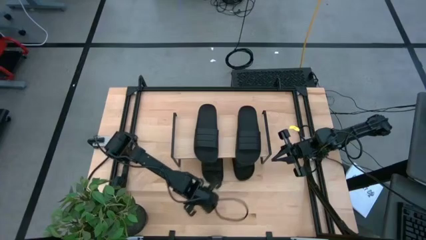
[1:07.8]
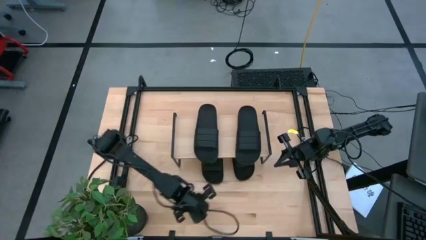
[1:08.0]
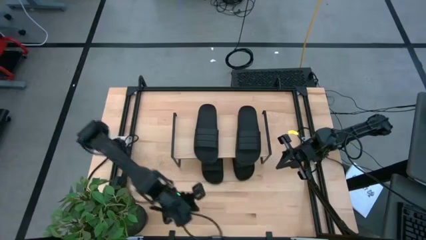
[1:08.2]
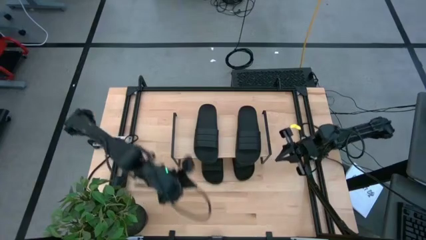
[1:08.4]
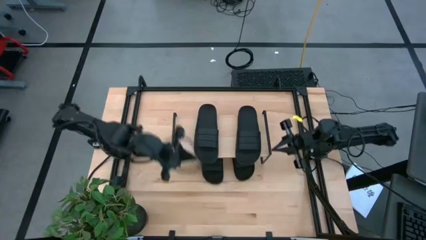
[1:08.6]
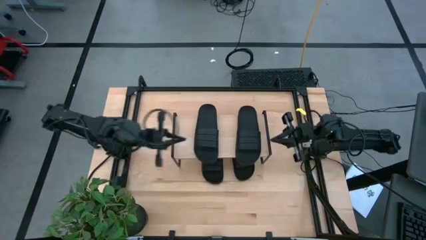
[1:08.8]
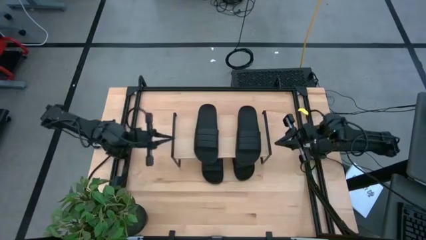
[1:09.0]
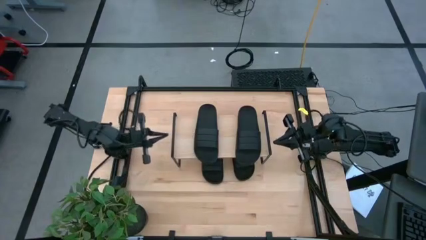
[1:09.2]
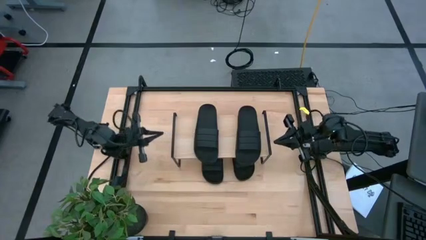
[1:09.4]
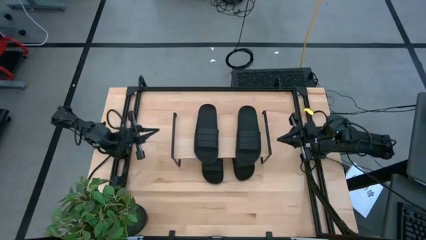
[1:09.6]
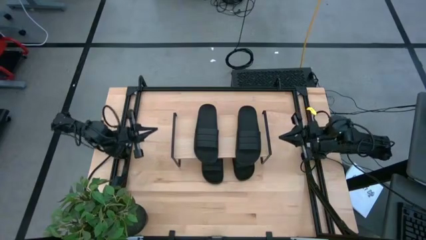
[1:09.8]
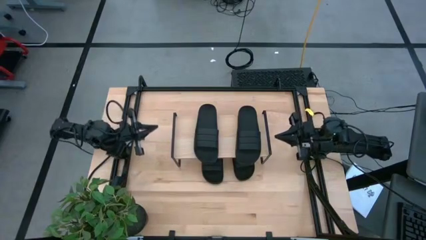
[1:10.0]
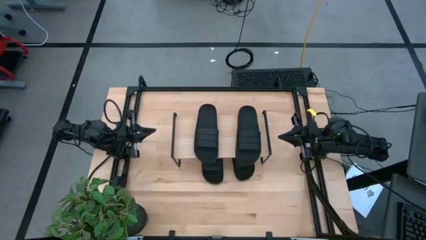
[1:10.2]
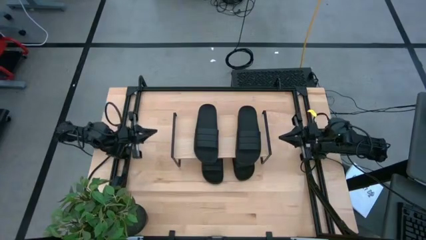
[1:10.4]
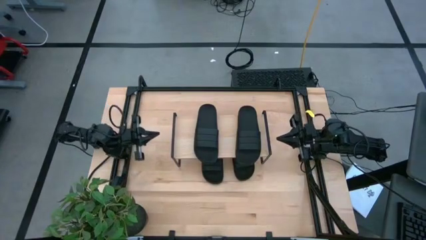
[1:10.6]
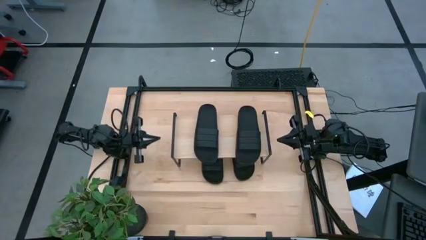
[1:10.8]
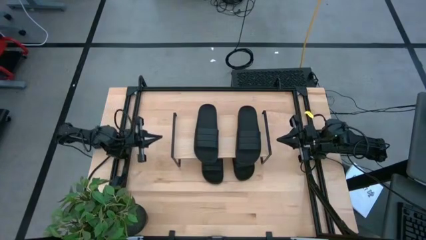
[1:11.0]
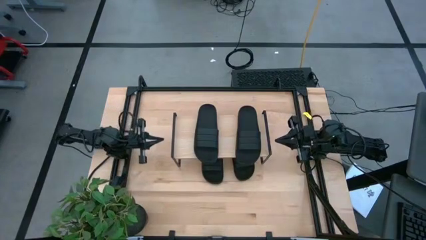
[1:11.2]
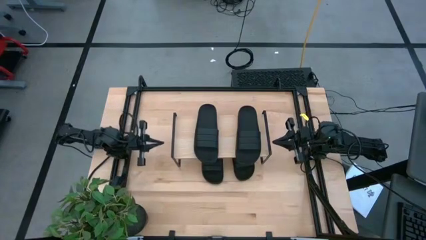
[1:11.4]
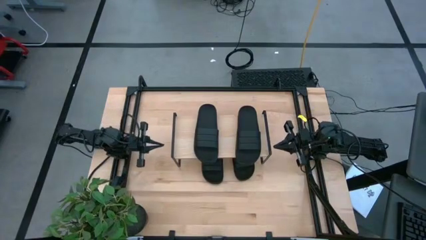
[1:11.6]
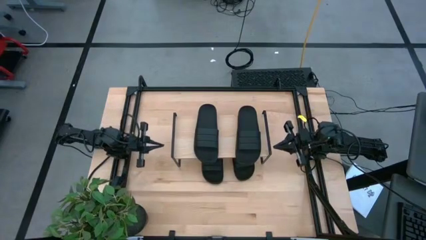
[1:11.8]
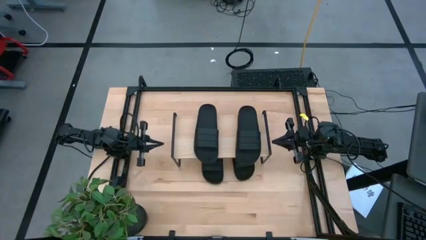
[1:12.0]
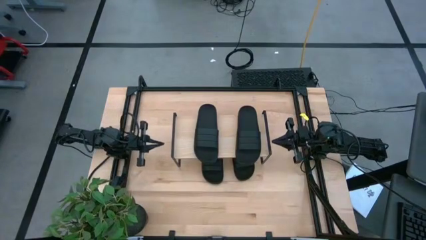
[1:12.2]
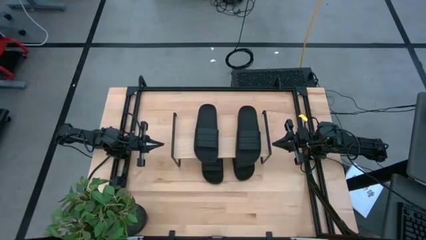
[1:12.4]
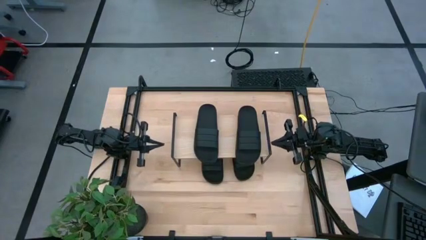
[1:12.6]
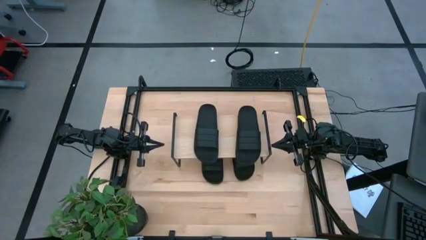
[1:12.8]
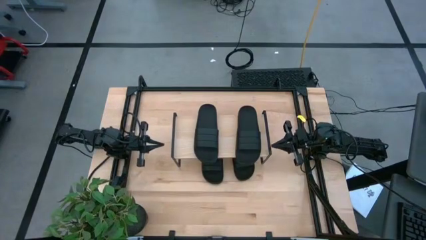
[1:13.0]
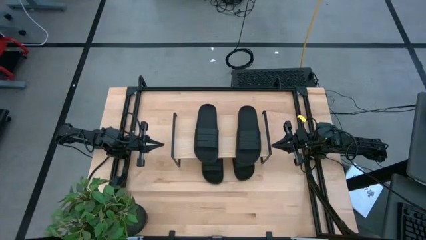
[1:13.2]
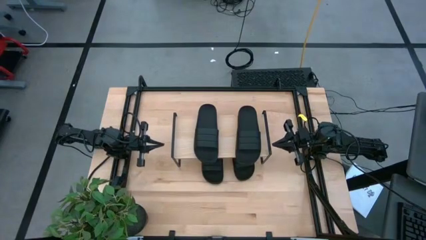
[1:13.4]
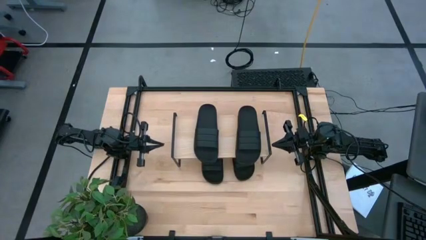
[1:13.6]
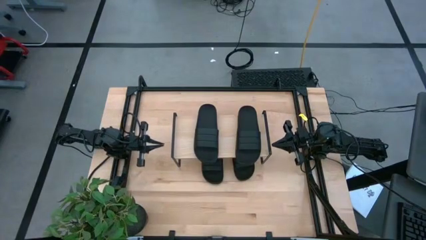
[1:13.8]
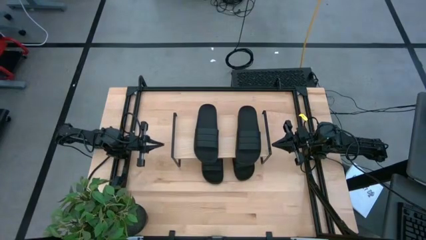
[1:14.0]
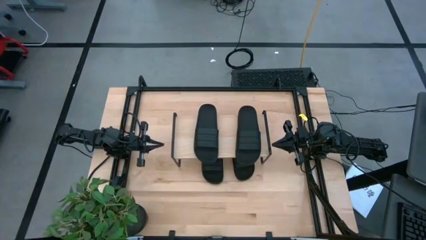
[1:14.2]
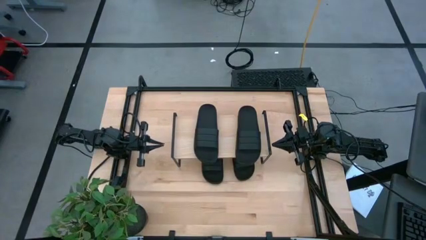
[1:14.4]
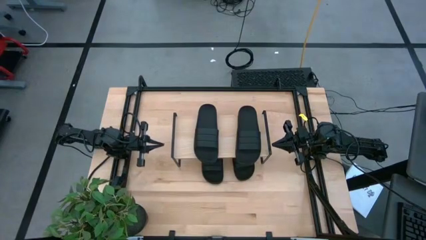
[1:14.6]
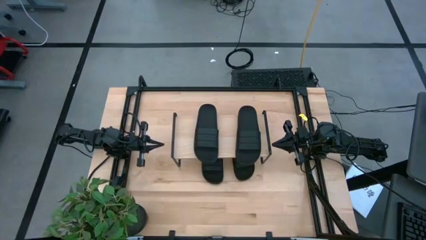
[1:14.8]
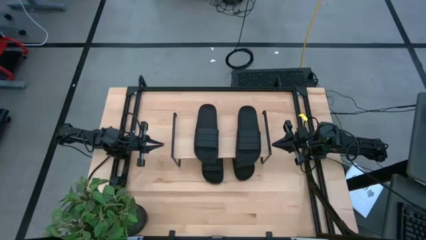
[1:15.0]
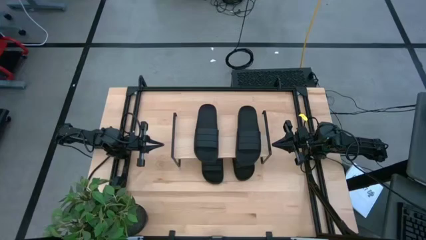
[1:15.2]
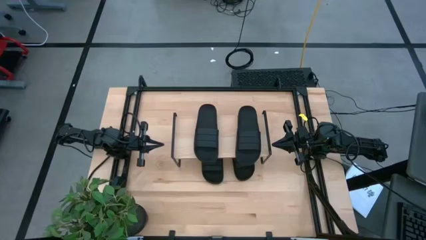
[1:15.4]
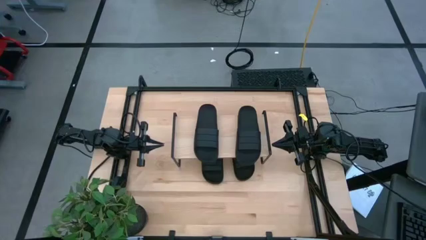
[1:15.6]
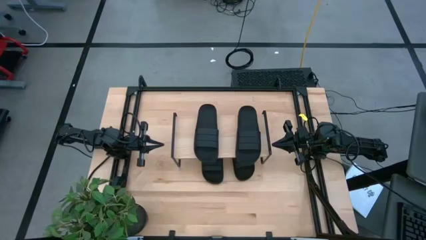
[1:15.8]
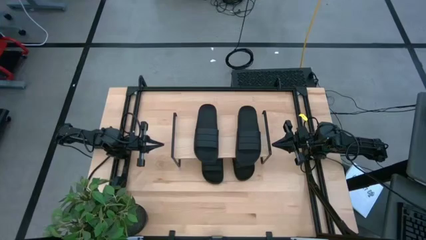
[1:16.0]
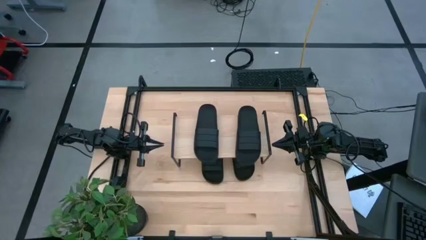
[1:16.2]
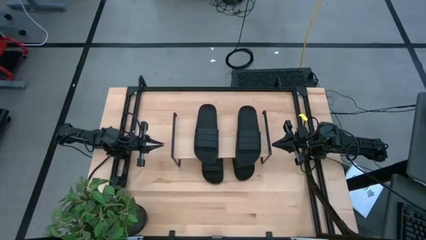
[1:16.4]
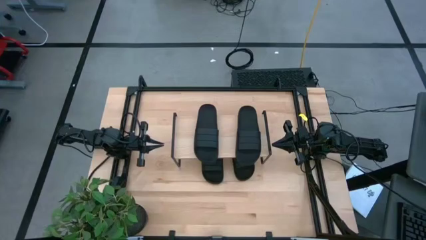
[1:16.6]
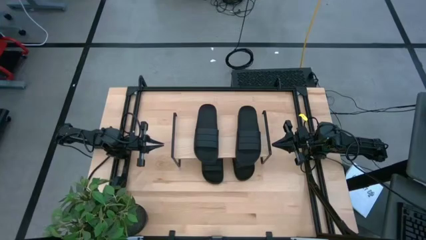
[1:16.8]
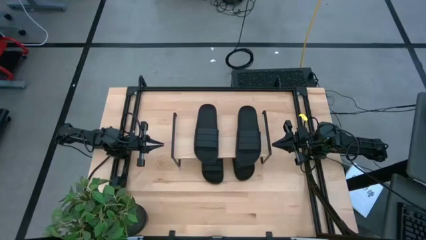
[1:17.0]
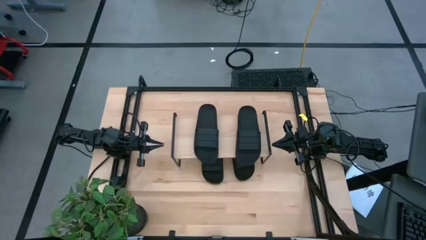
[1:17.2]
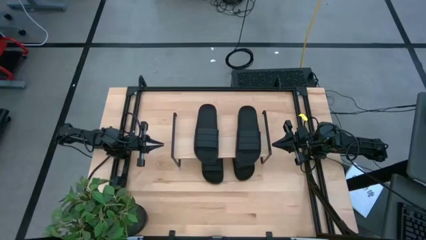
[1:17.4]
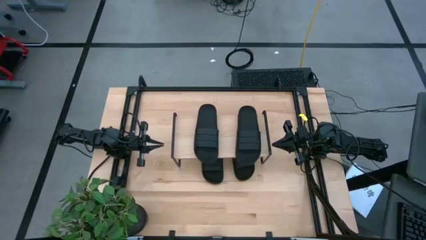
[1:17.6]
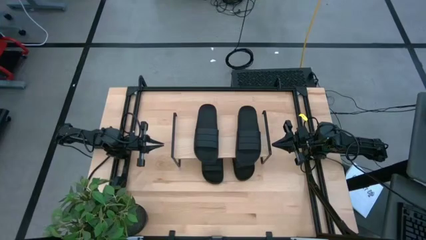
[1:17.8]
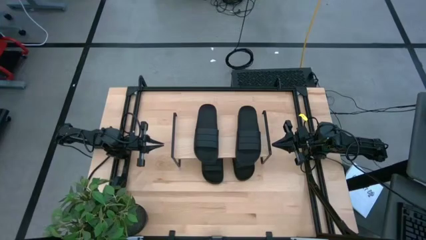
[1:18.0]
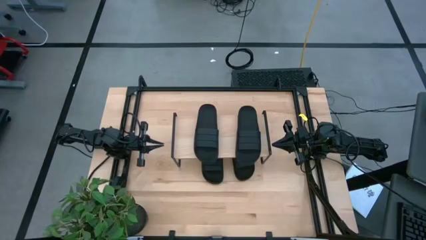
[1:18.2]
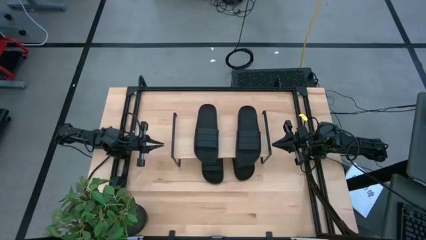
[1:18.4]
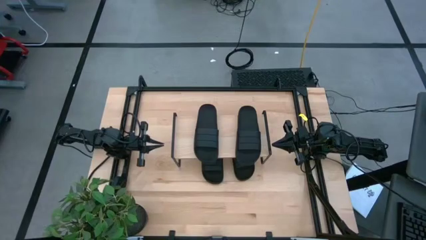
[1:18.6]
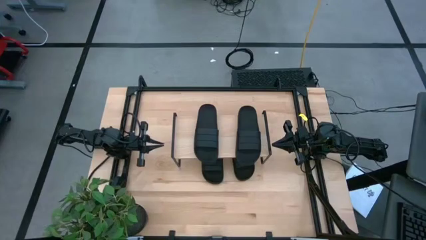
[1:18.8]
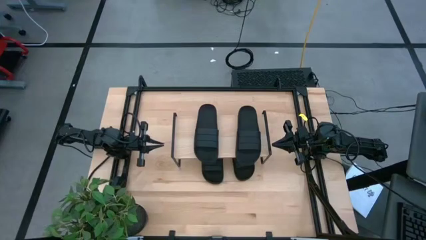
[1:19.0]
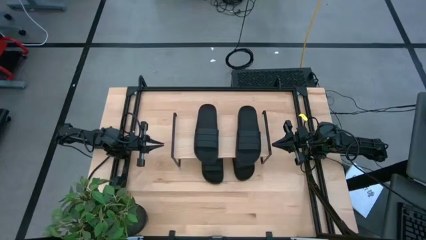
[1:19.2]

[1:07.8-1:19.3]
Task: Pick and place slides into the shelf
Return to Home Position

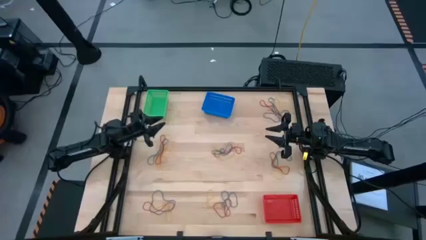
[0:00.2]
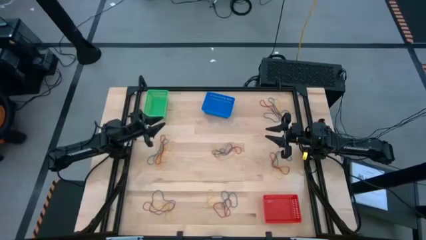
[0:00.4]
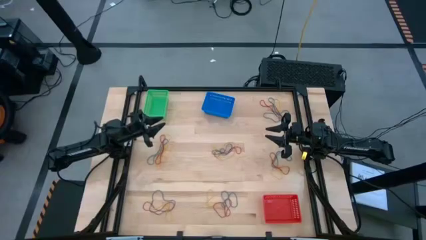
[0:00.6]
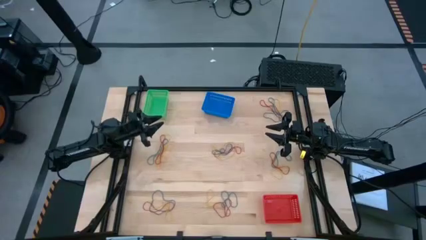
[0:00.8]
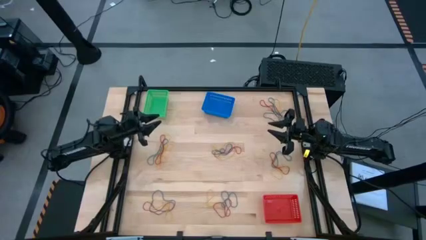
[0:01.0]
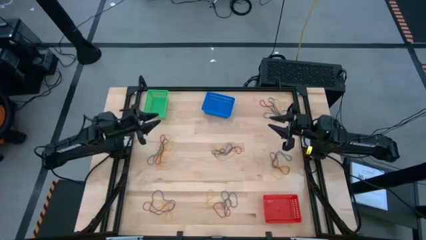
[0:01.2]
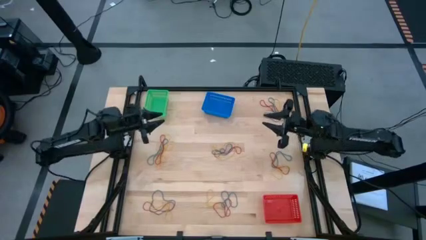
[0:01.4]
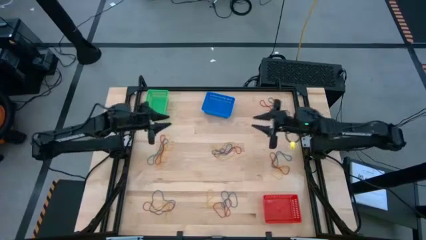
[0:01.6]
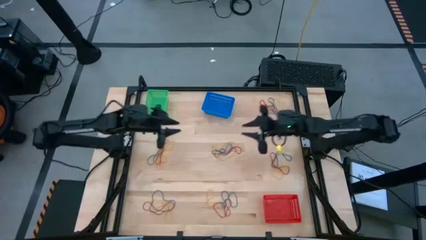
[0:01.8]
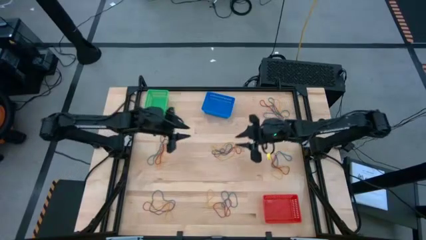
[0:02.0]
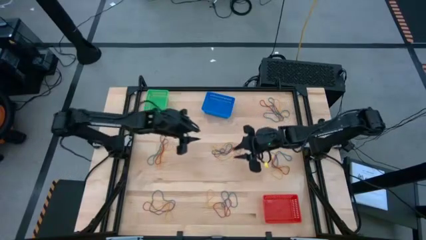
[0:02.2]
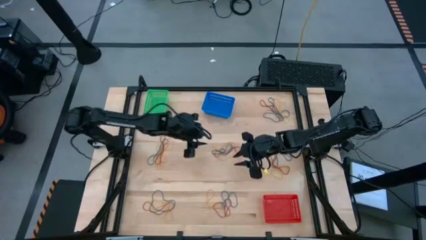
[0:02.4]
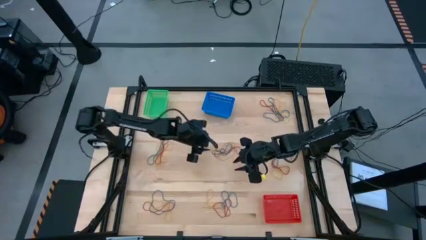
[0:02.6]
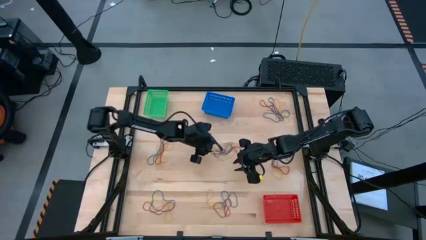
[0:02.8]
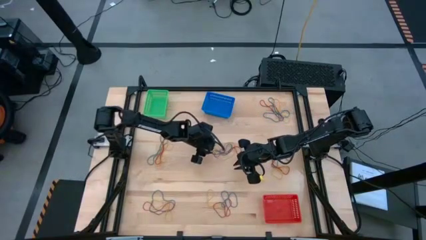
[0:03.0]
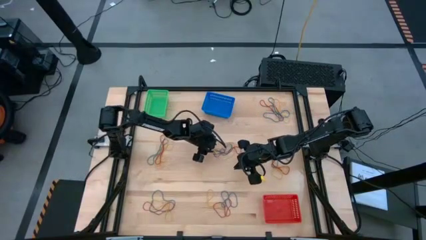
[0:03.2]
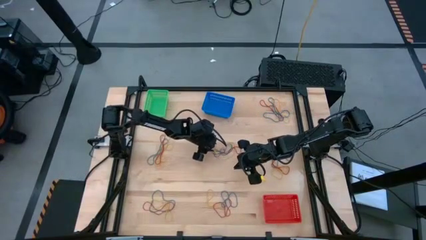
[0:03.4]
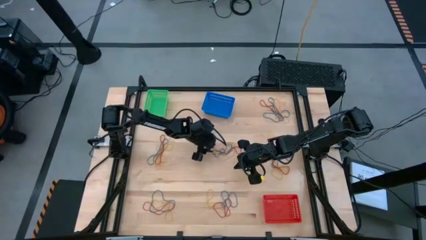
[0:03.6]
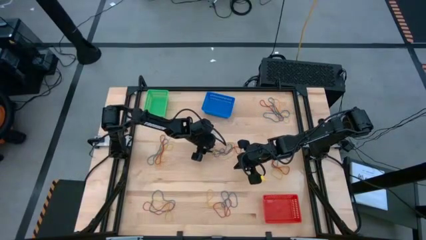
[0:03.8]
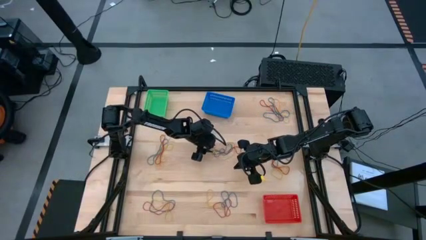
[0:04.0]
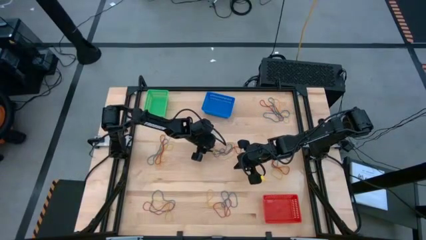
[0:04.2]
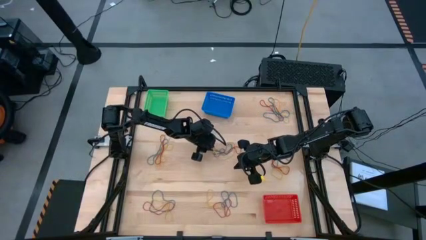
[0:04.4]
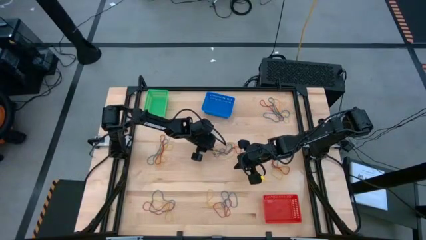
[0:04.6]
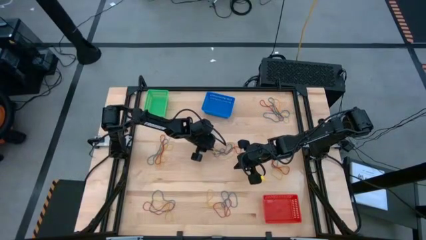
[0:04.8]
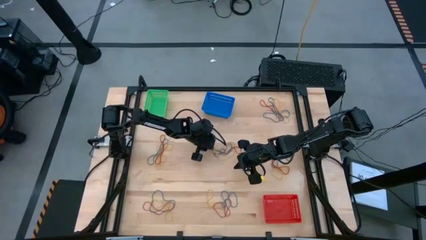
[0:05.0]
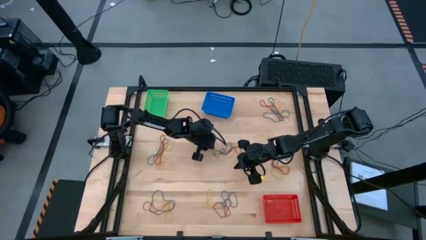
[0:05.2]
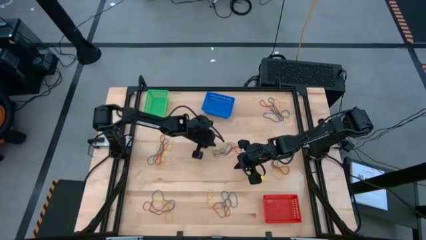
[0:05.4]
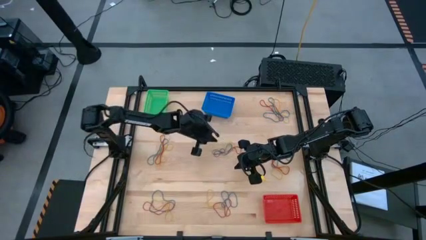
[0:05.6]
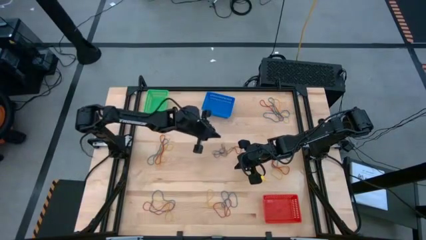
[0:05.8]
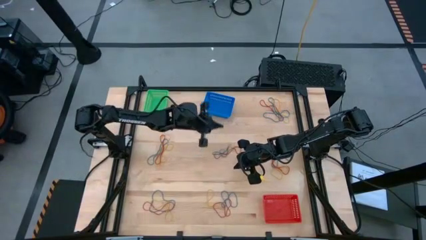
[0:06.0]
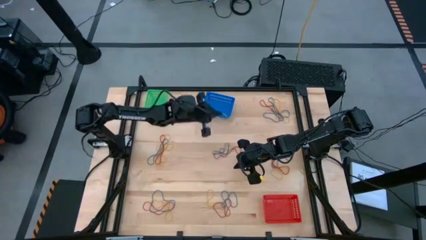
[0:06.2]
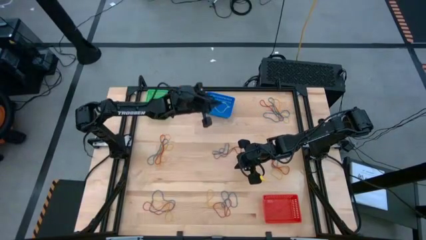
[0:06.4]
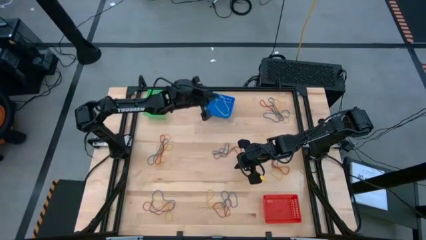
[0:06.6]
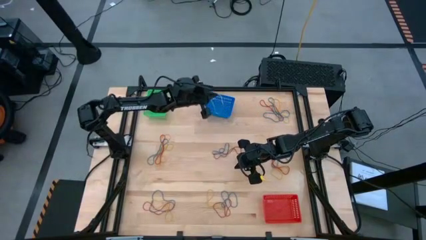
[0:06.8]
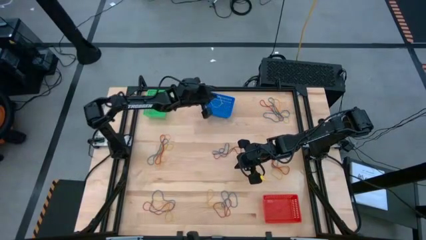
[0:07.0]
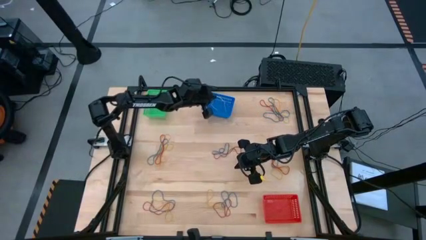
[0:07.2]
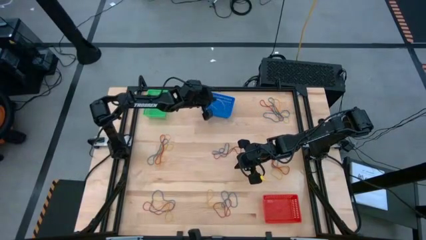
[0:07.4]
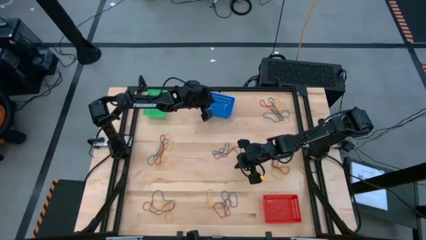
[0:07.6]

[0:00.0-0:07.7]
Task: Sort rubber bands into baskets
Put the yellow rubber band into the blue bin
